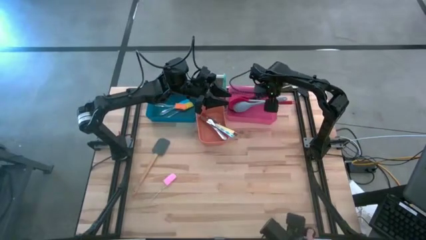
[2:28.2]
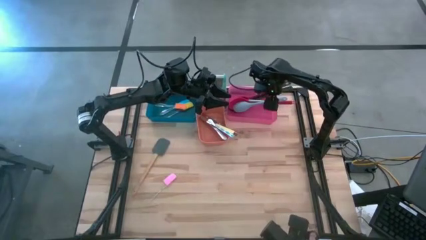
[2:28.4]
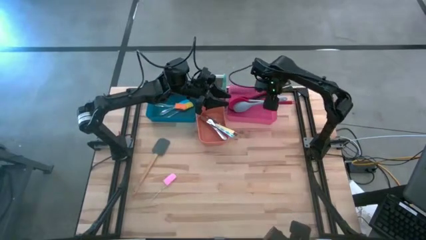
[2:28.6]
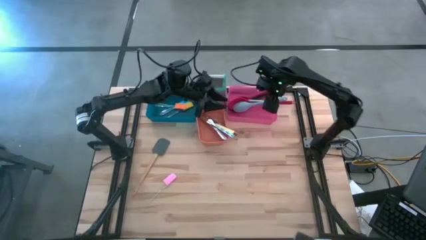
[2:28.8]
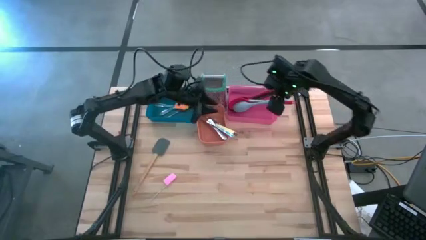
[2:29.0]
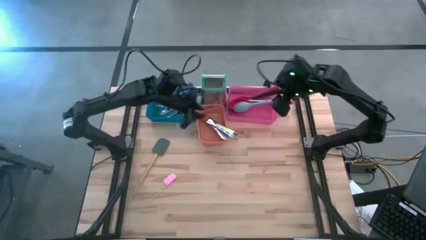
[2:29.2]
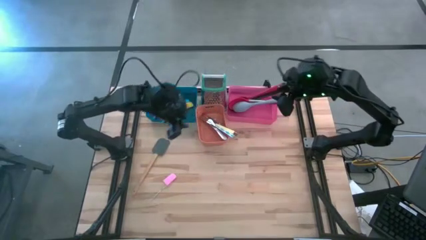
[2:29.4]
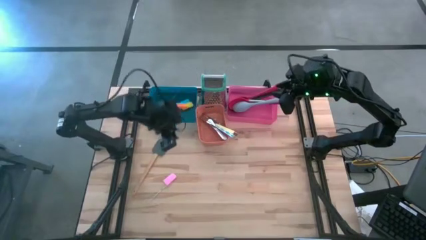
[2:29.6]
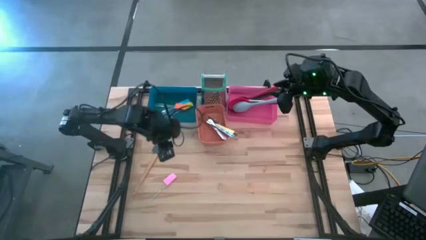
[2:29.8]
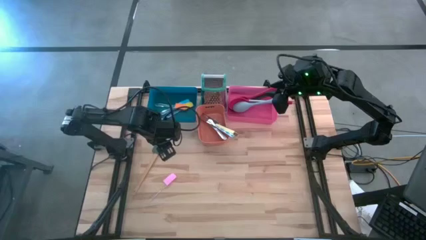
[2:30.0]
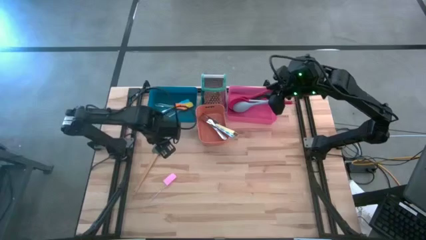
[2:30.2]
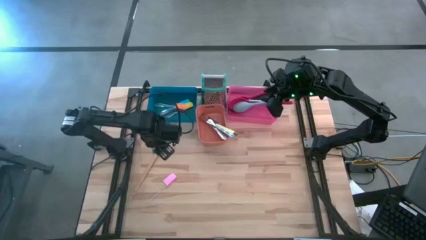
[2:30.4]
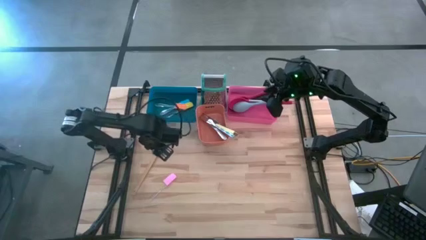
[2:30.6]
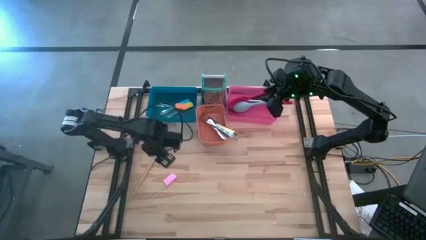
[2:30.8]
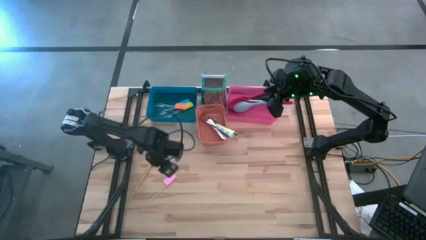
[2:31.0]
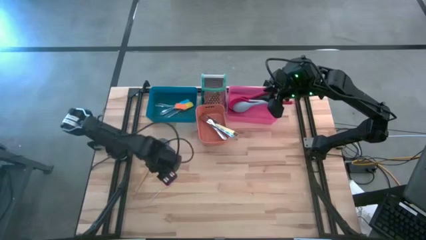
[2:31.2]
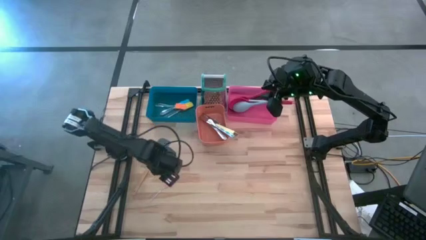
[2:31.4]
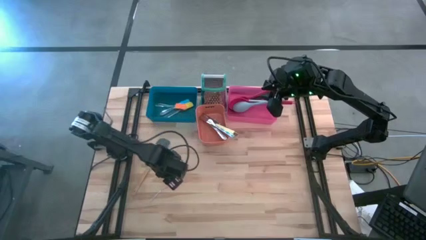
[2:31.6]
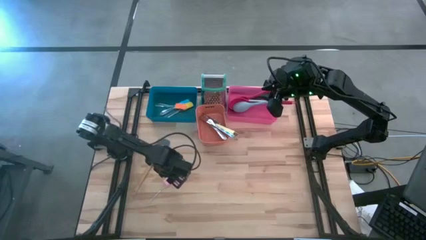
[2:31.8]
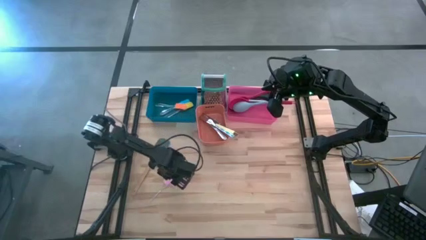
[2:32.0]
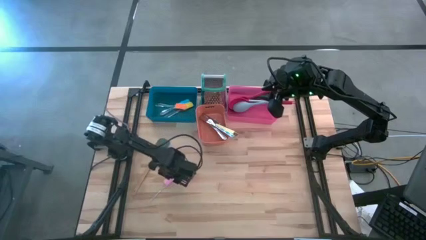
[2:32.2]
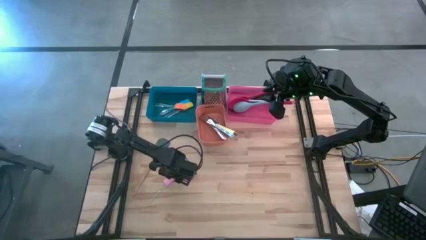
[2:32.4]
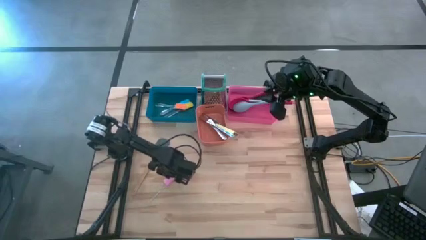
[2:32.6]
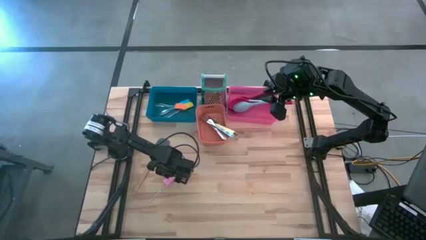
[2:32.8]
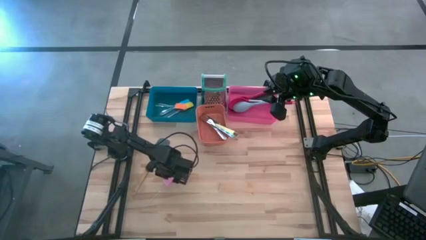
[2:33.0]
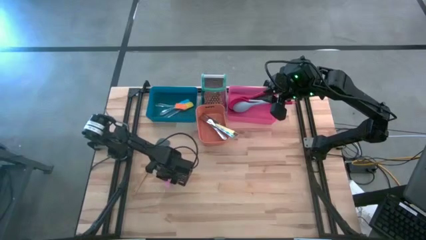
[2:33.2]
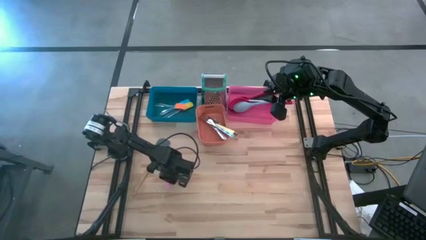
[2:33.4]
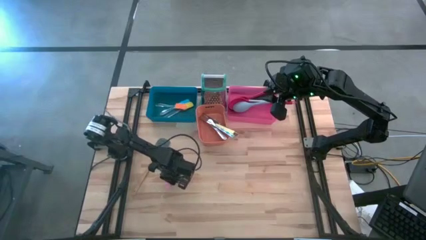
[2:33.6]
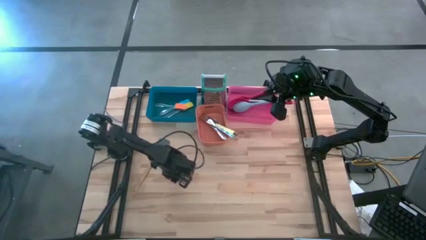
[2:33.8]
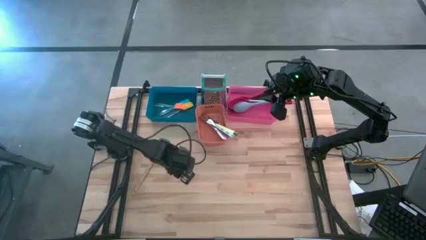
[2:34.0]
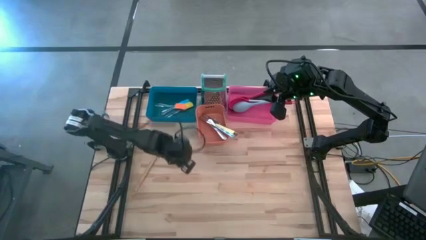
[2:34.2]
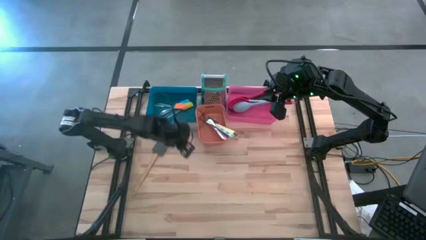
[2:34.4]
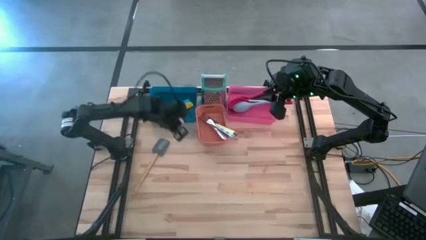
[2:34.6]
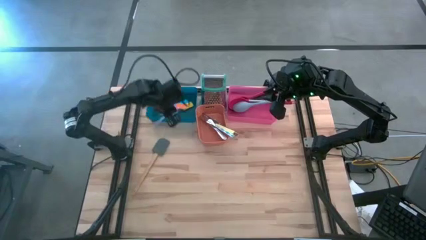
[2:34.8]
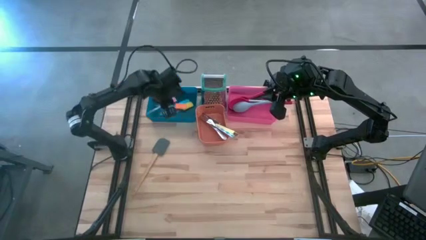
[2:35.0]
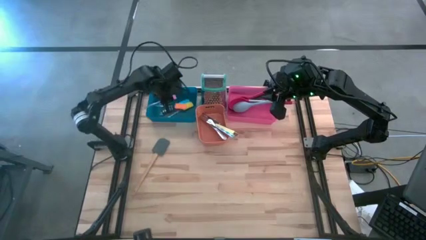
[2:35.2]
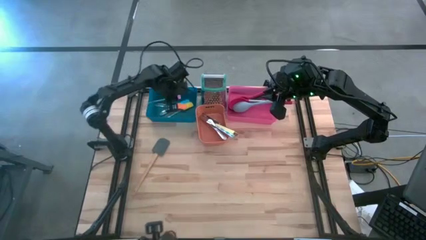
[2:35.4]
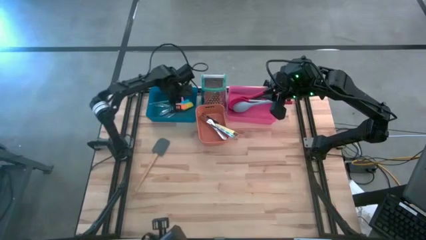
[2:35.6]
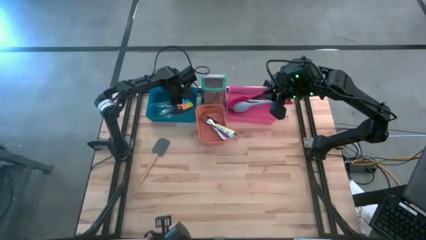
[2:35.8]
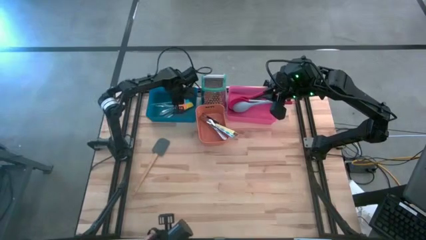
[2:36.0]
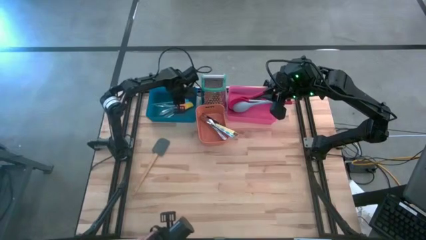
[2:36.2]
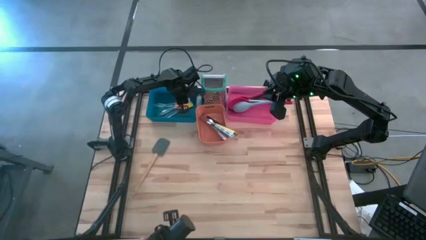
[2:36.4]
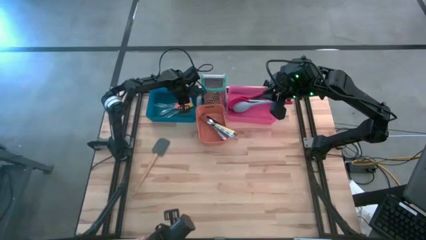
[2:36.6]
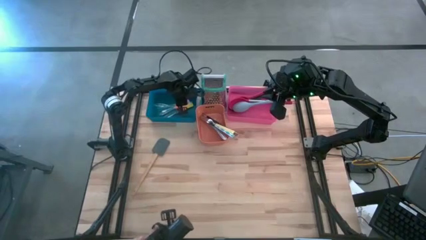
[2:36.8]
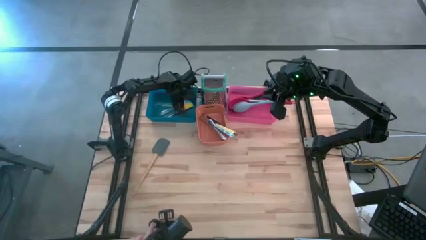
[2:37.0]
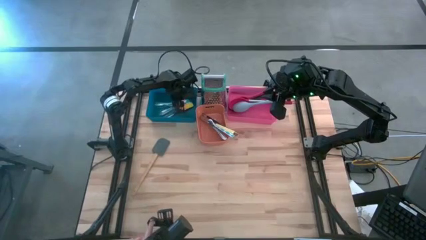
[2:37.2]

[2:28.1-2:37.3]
Task: Pick & Place Kitchen Items
Put the pink spatula into the blue bin

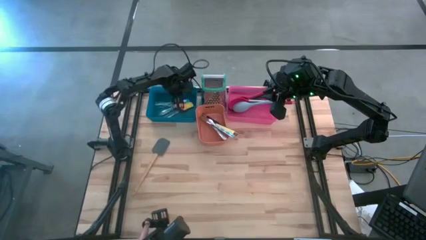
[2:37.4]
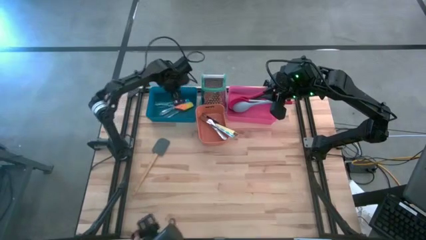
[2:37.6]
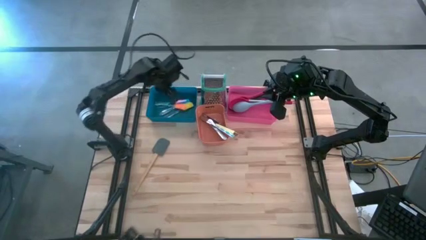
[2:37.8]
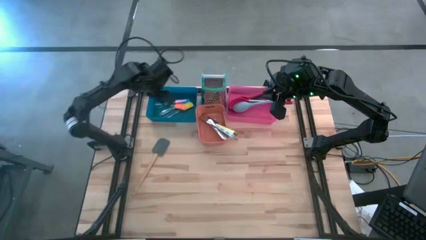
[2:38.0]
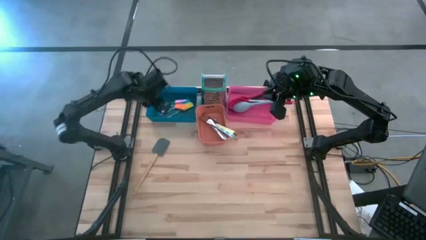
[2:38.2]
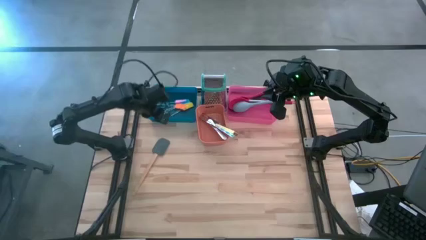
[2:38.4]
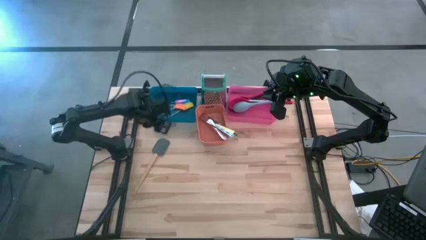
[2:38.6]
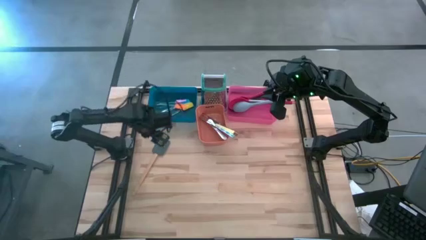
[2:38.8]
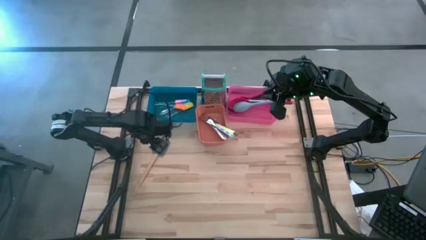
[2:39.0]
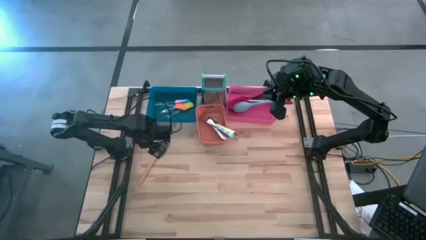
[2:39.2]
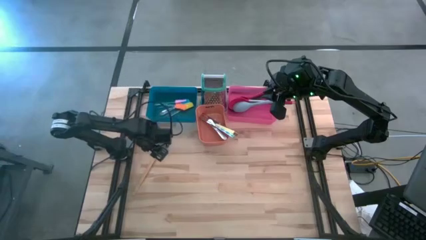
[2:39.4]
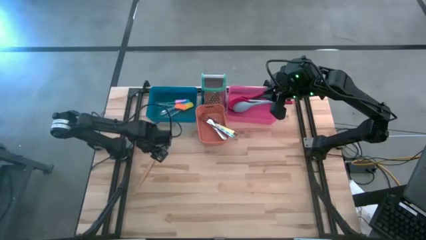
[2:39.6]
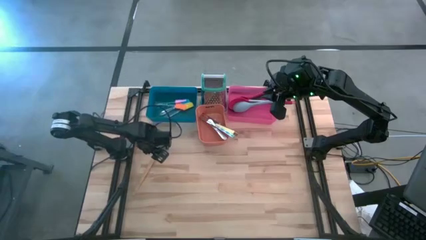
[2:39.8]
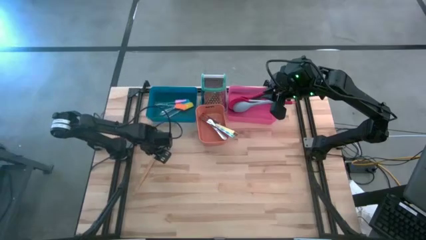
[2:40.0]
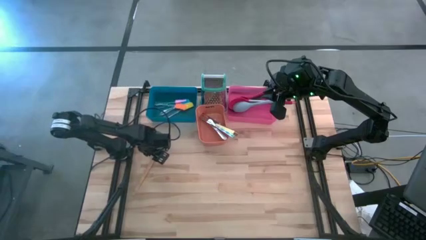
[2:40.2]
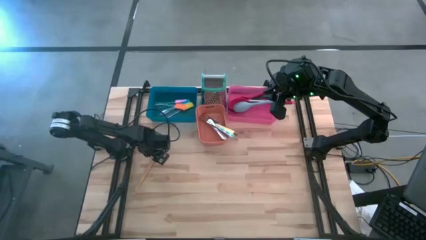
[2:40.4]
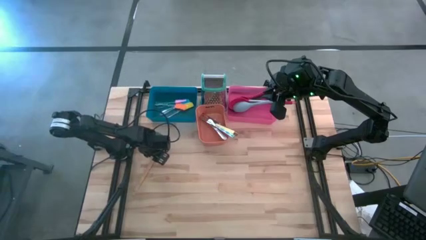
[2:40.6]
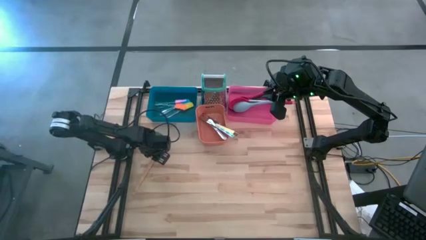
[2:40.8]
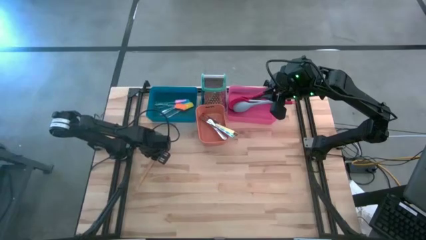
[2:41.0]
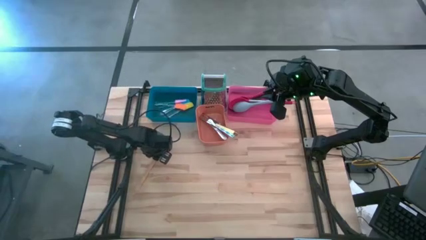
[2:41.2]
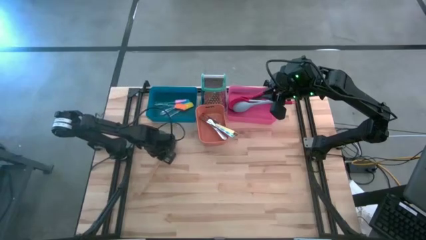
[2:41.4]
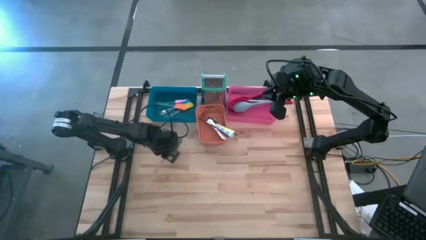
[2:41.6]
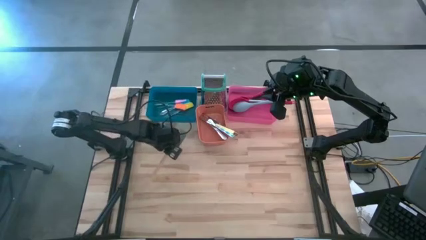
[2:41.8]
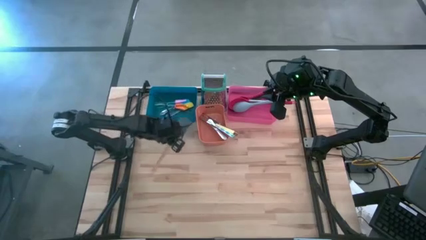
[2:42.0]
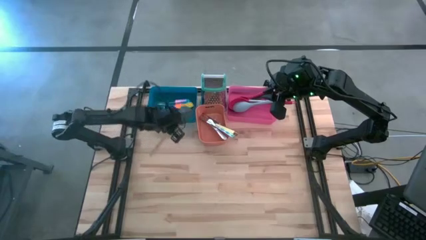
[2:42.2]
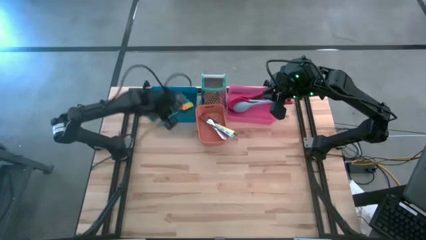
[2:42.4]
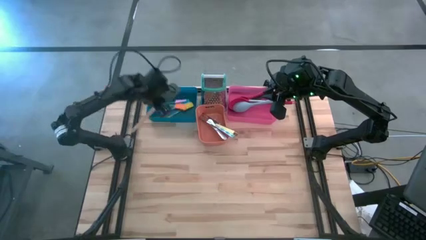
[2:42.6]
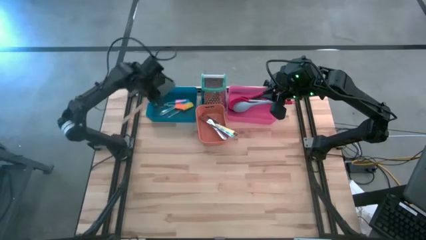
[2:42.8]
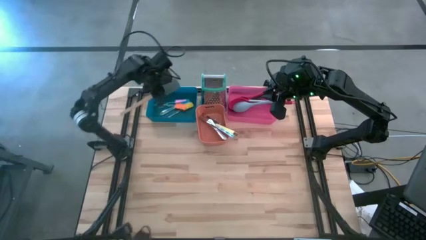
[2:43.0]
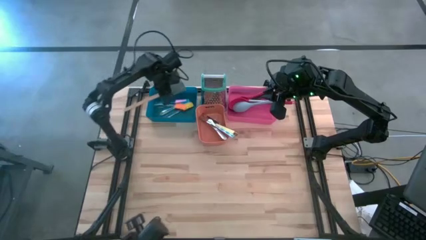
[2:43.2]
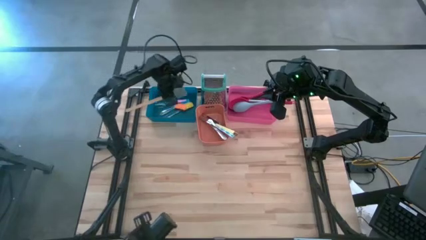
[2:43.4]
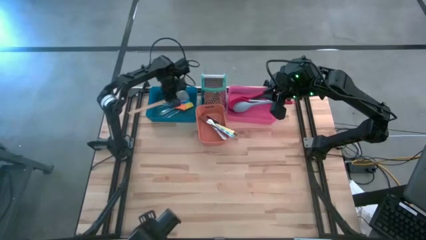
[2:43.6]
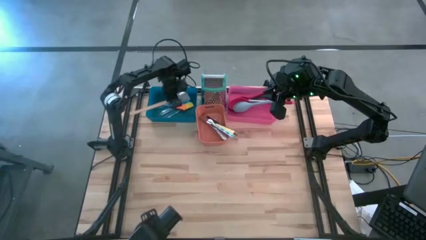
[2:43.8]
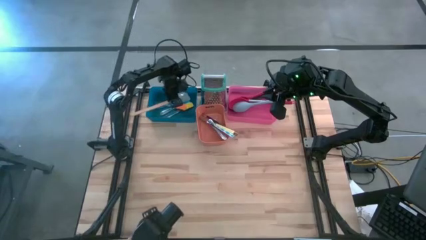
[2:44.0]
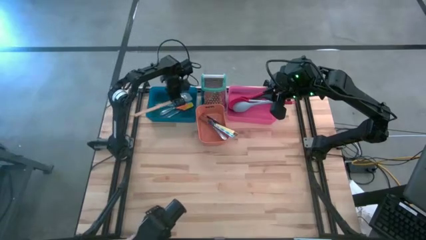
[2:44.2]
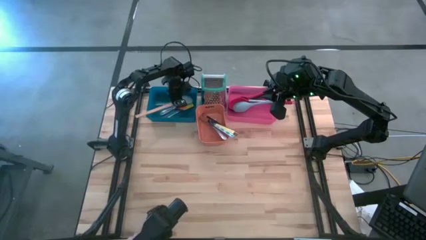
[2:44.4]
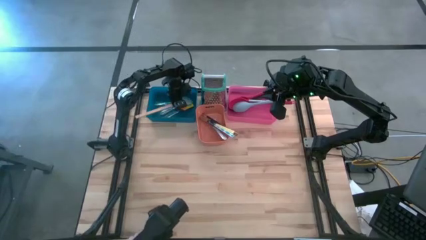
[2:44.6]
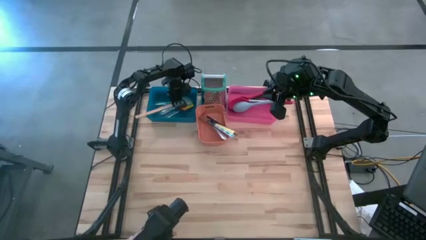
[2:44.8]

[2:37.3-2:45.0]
Put the gray spatula into the blue bin
